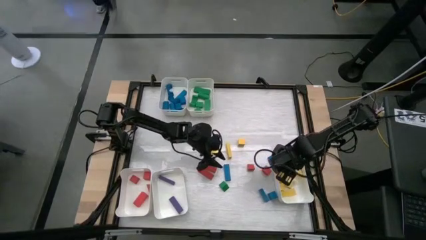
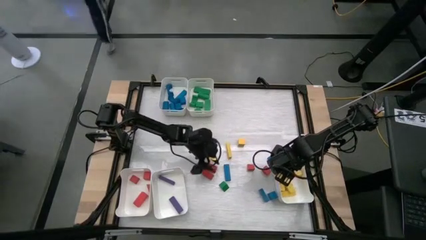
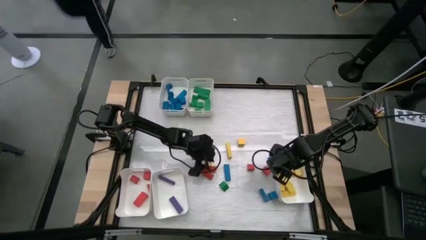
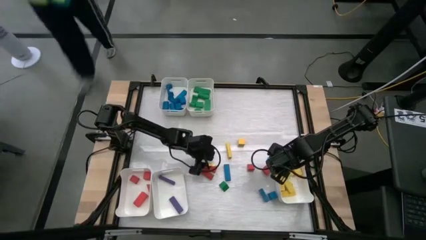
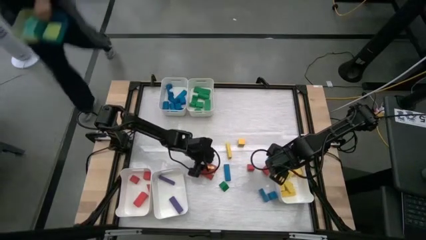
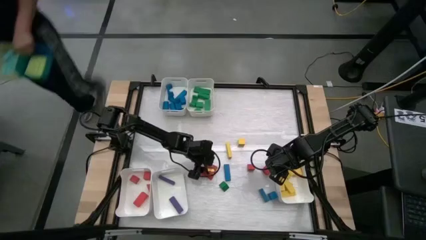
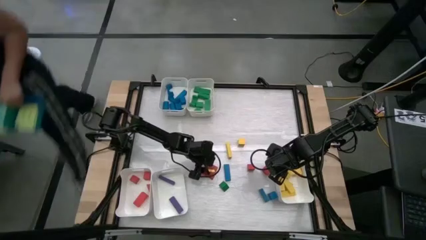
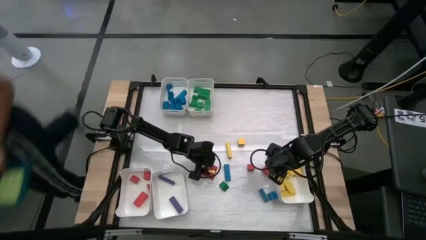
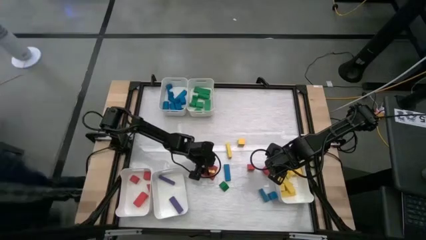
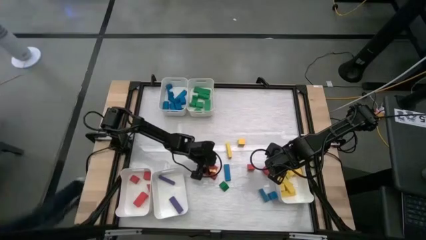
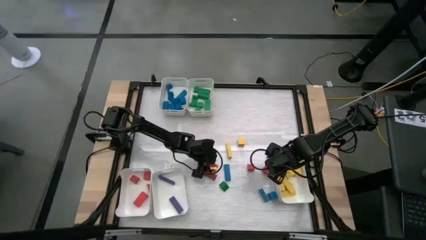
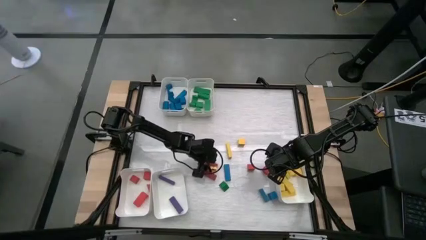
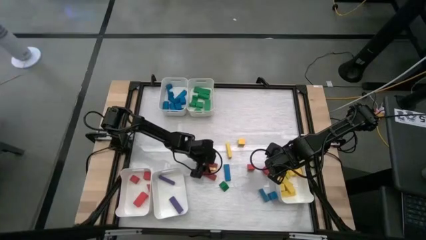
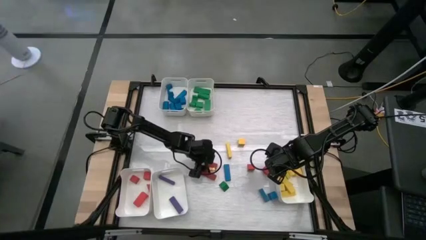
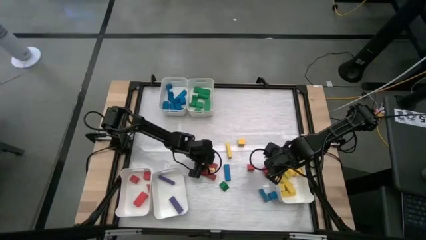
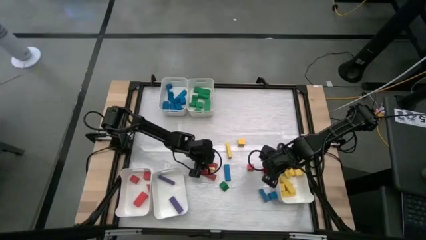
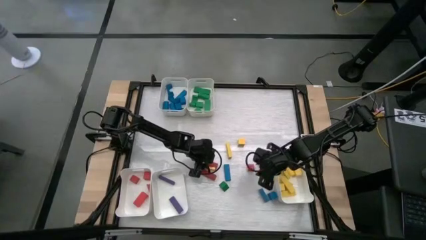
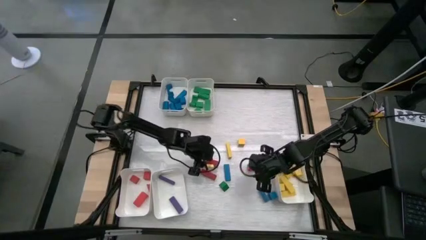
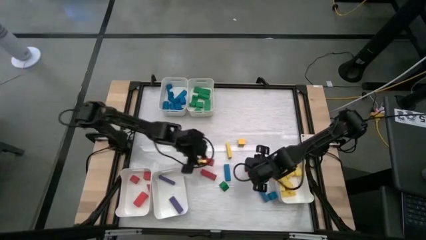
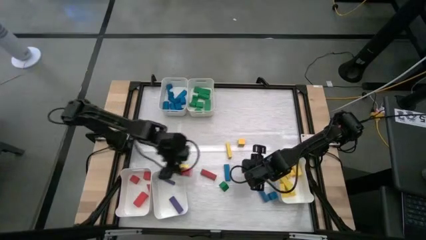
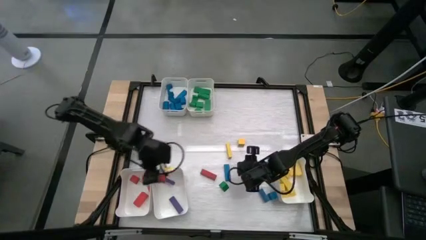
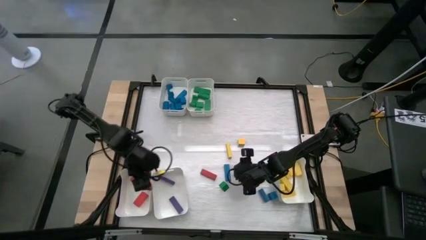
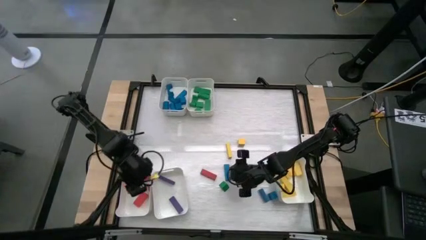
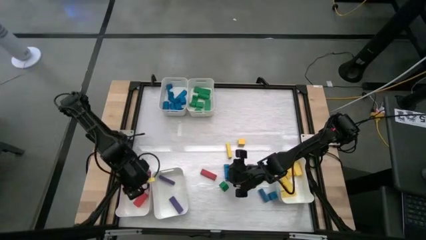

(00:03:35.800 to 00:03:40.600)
Task: Sort blocks
Put the red block into the bottom left white bin

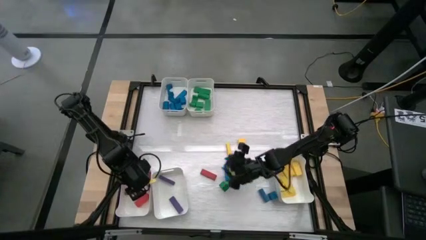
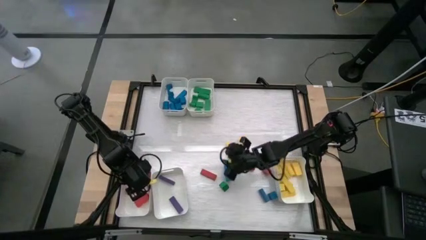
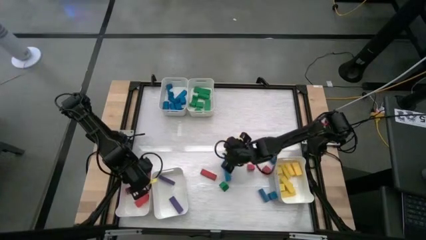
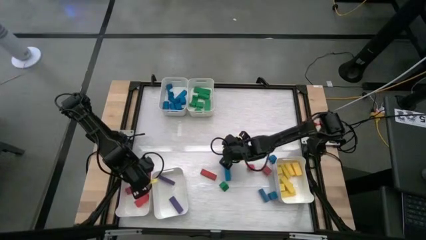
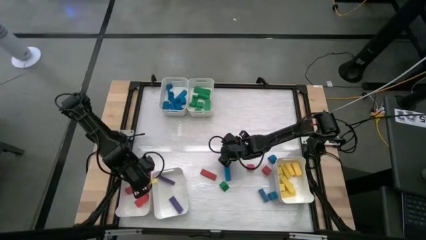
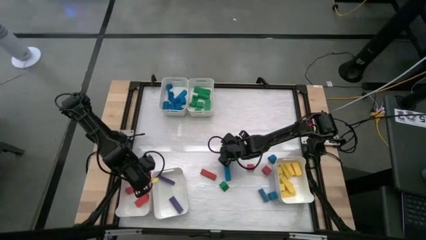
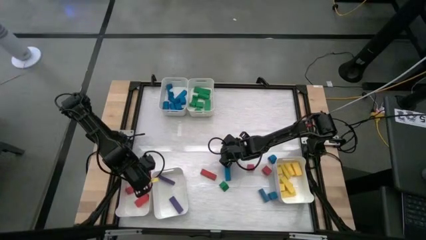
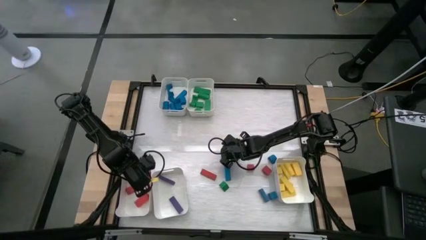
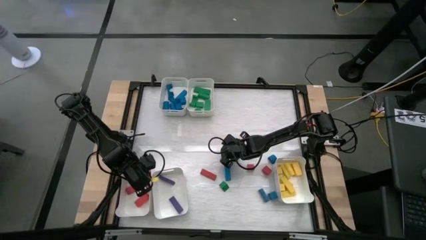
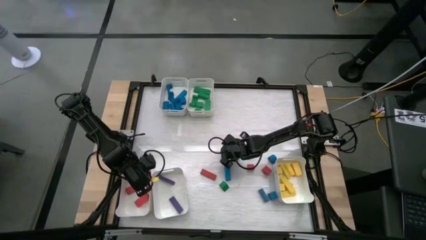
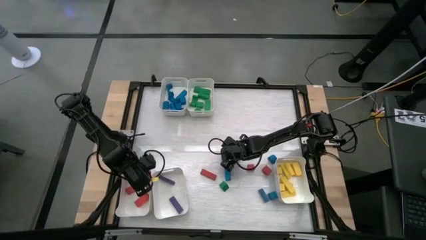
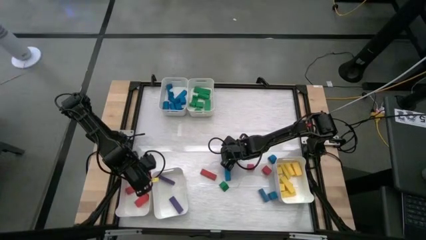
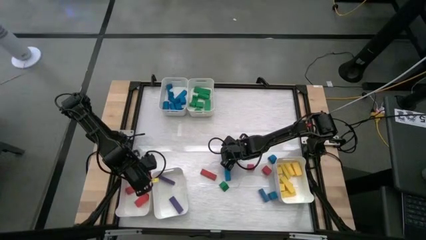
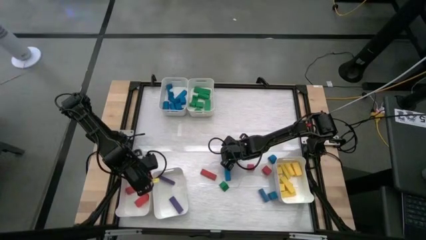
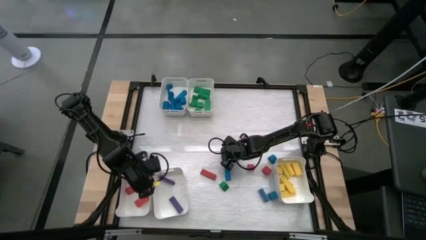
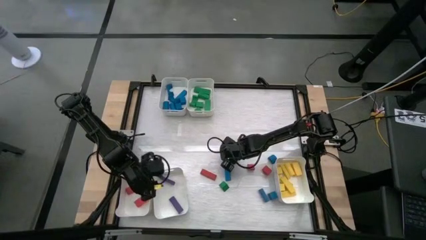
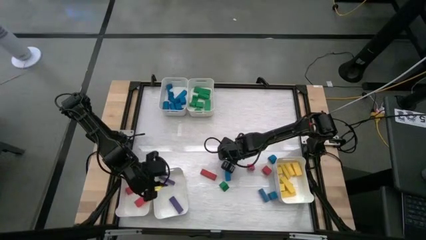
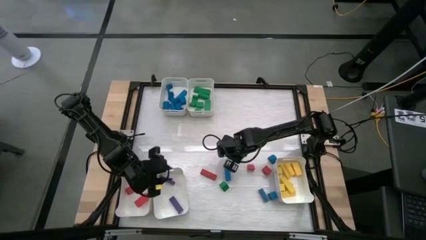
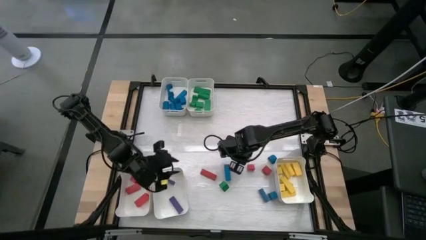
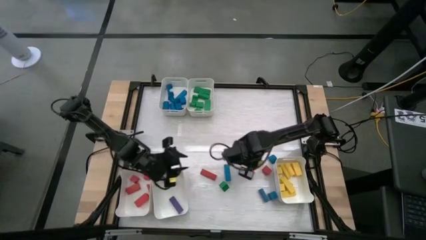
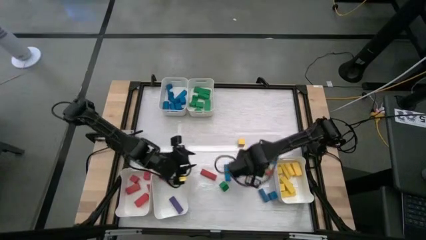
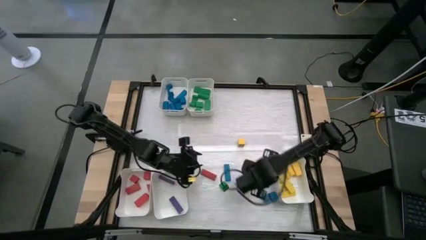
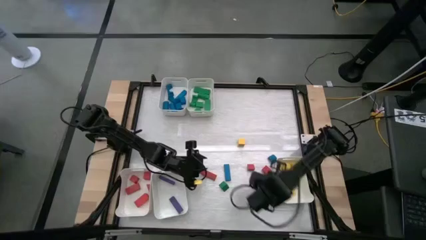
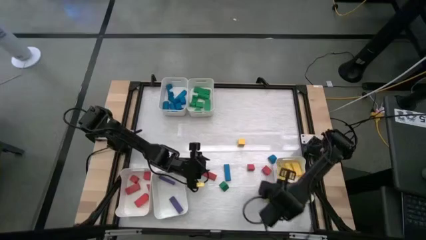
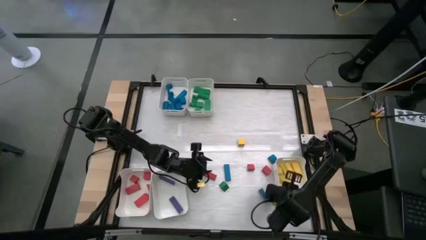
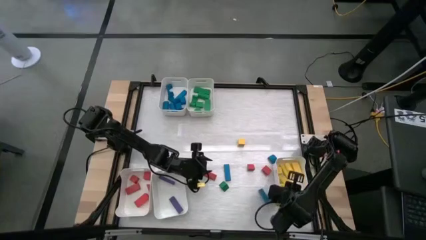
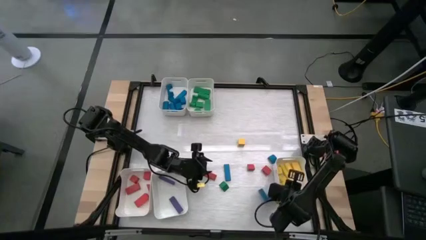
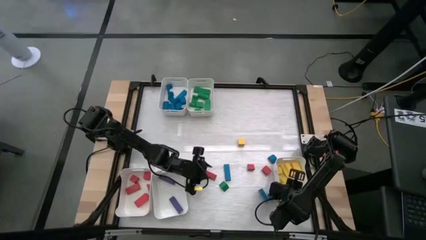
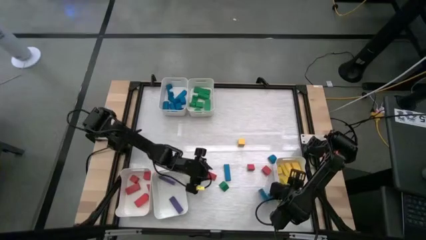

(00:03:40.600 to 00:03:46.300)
Put the yellow block into the bottom right white bin

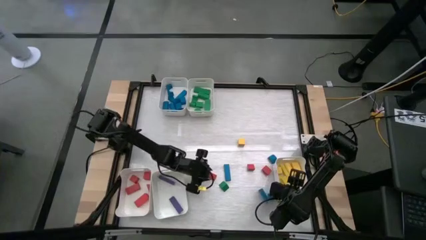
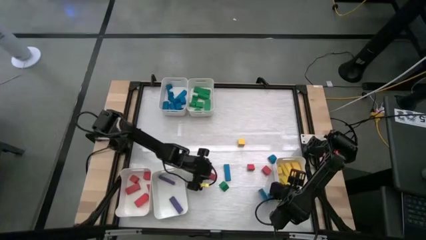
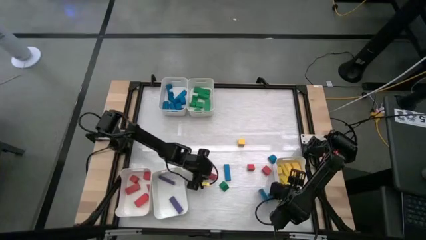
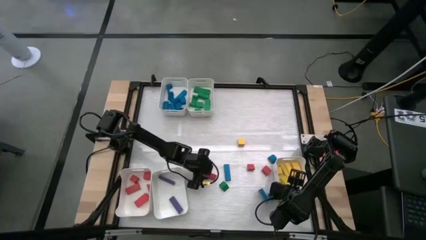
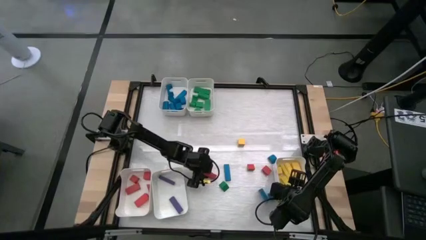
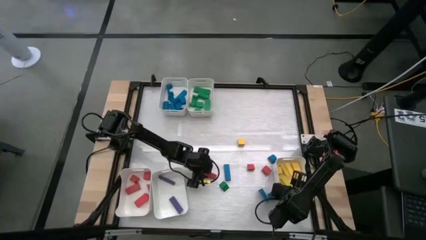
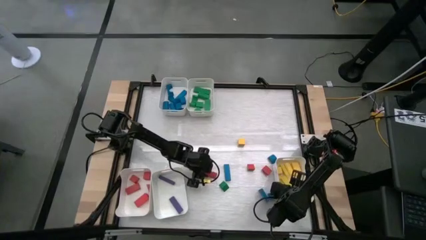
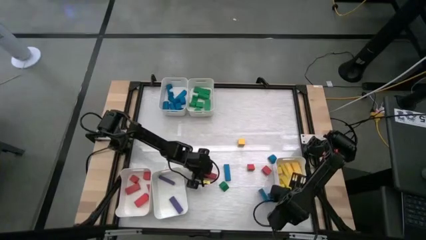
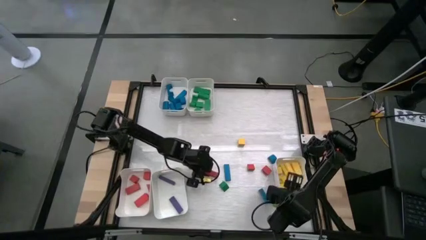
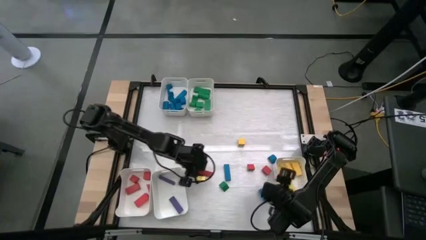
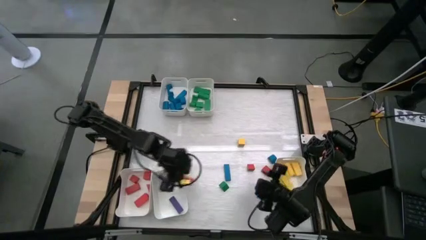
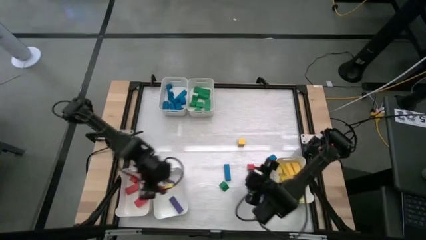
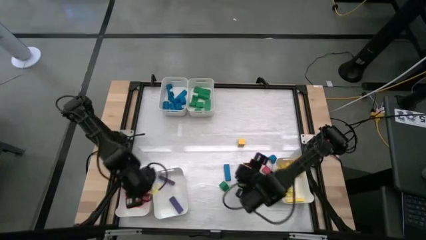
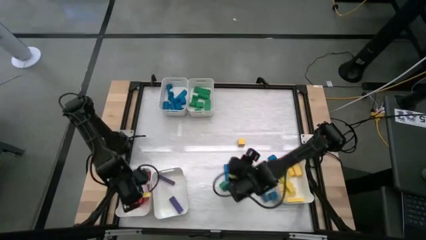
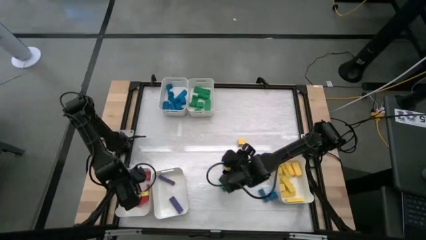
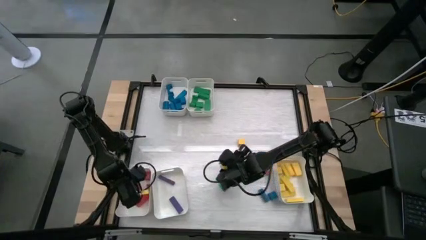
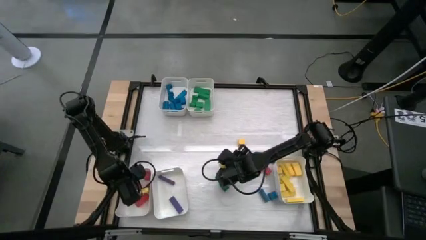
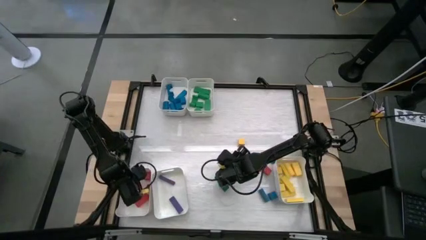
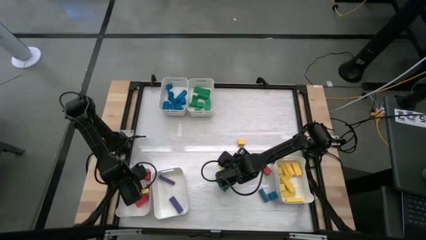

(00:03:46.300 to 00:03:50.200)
Put the red block into the bottom left white bin

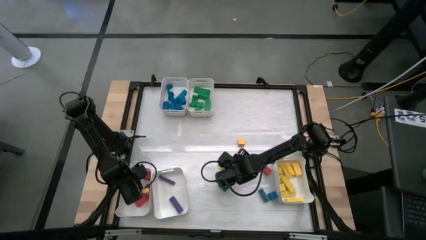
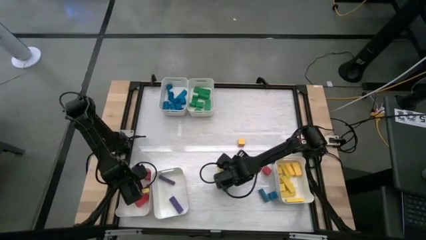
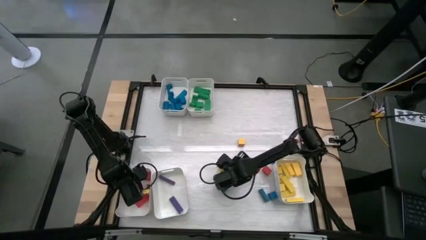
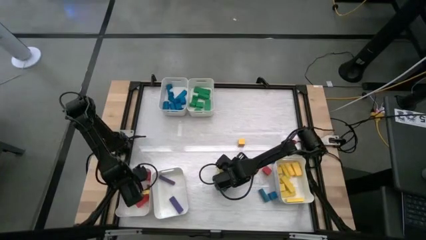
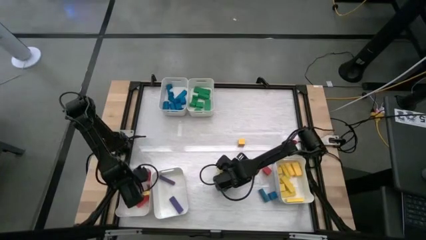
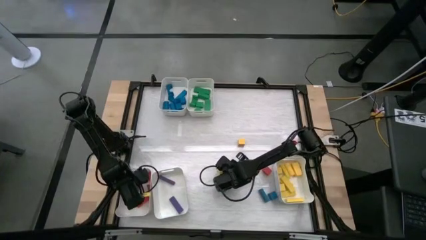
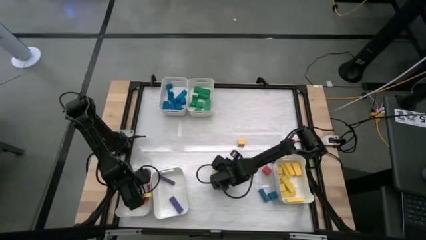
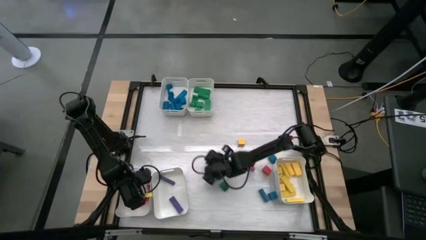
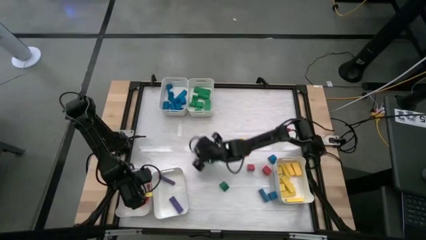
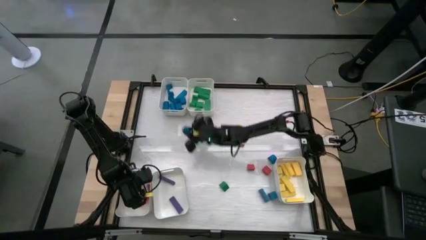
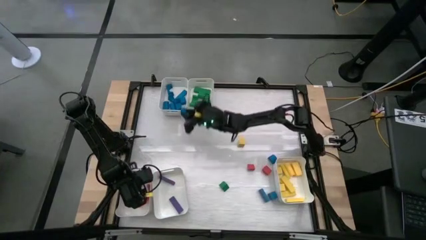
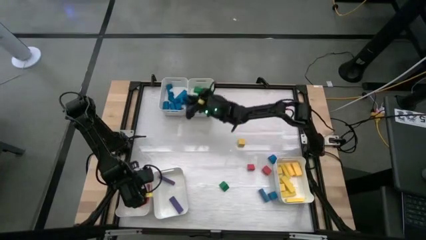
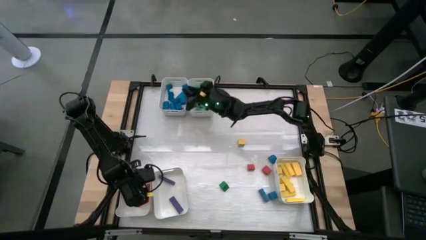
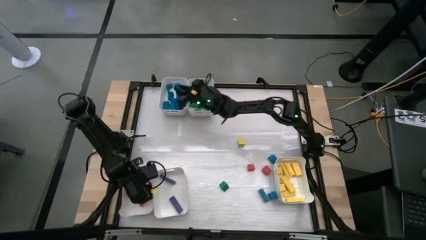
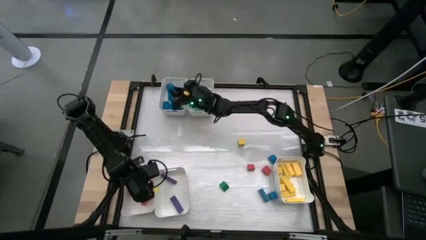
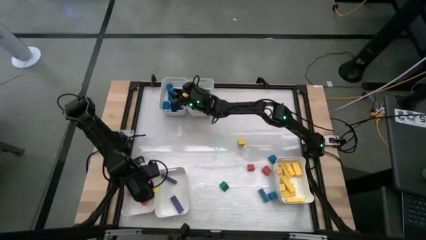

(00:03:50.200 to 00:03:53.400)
Put the blue block into the top left white bin
